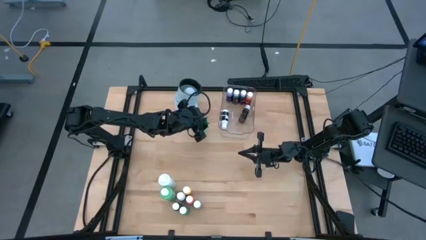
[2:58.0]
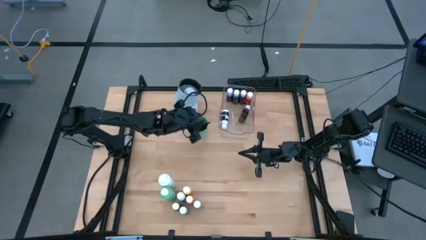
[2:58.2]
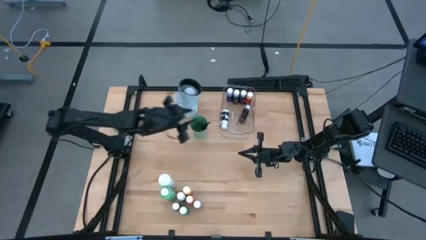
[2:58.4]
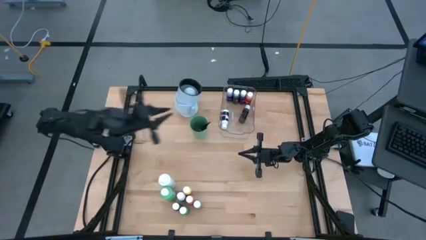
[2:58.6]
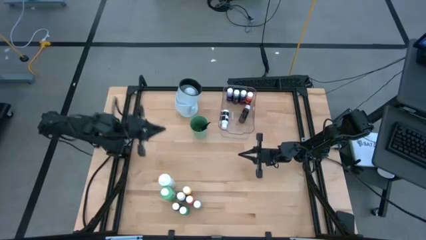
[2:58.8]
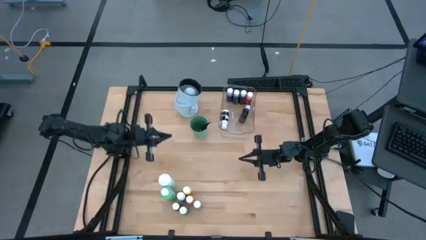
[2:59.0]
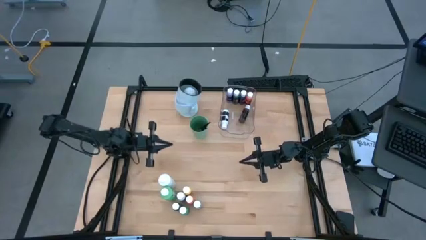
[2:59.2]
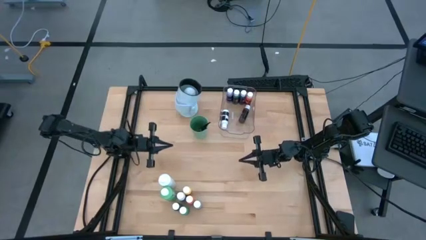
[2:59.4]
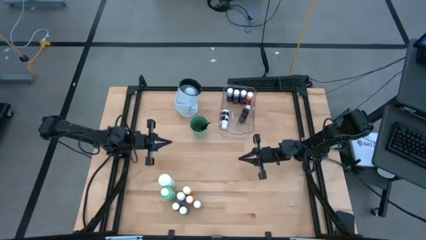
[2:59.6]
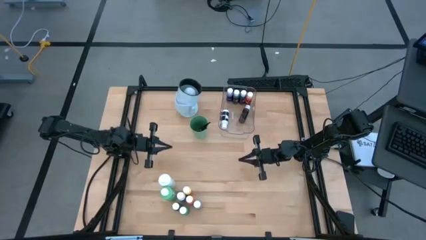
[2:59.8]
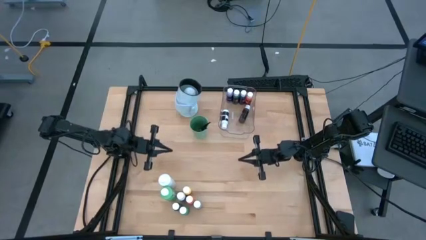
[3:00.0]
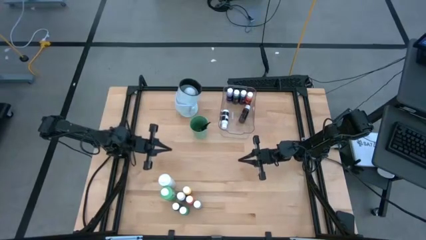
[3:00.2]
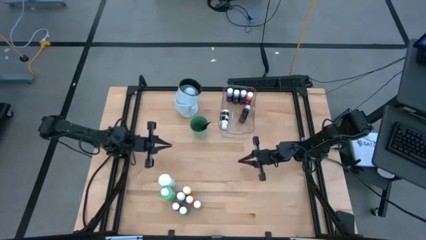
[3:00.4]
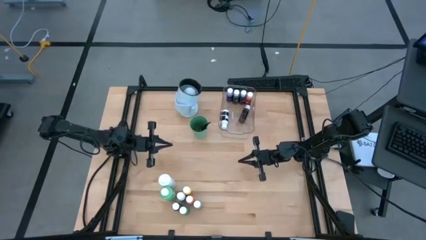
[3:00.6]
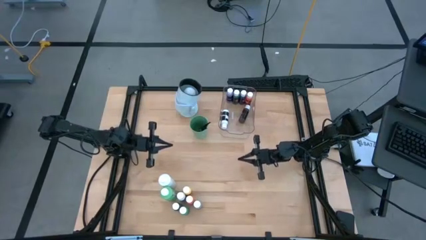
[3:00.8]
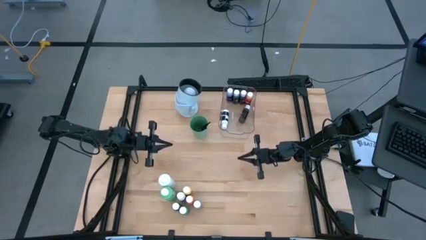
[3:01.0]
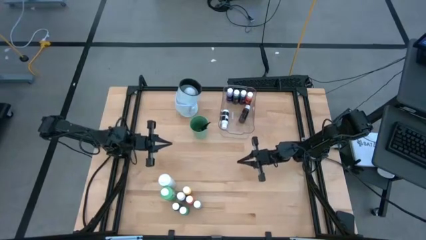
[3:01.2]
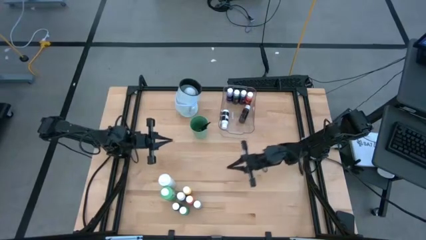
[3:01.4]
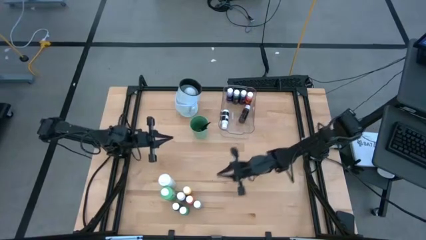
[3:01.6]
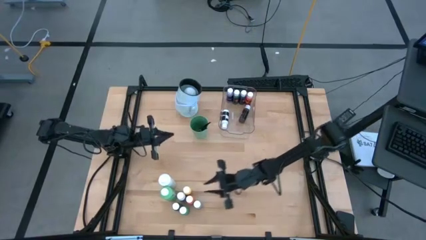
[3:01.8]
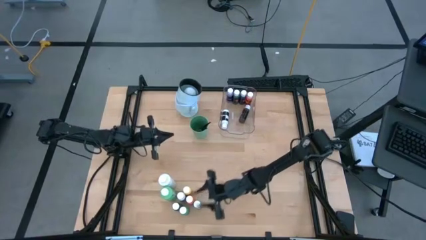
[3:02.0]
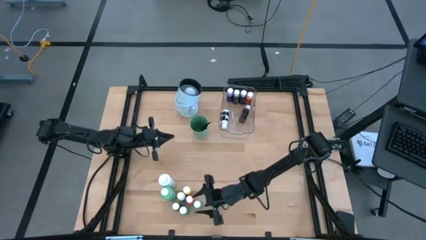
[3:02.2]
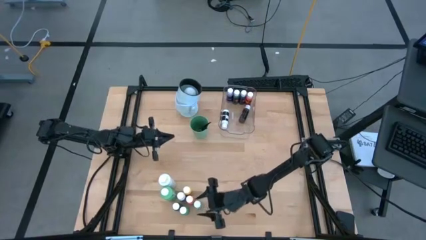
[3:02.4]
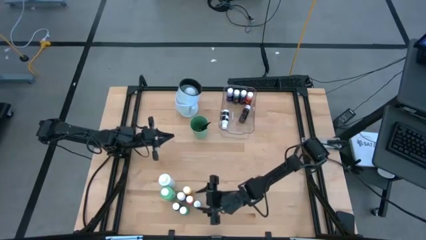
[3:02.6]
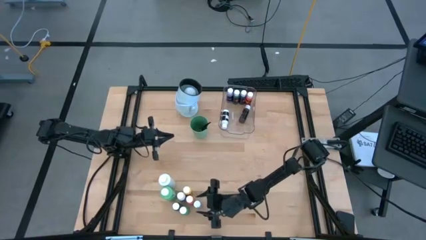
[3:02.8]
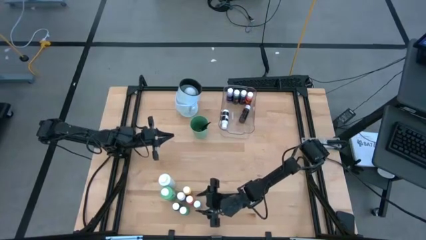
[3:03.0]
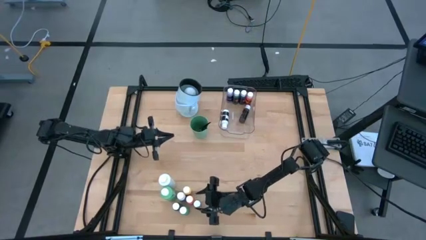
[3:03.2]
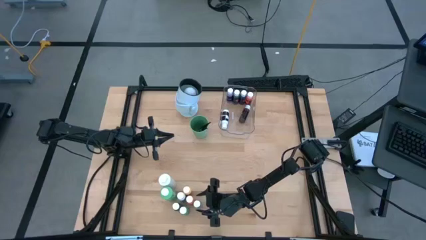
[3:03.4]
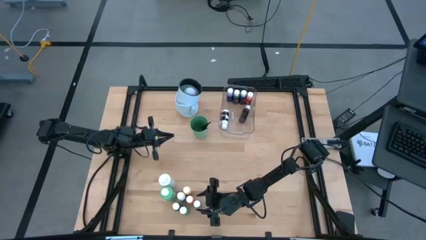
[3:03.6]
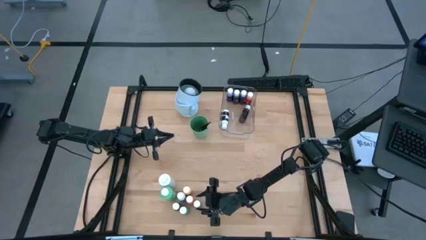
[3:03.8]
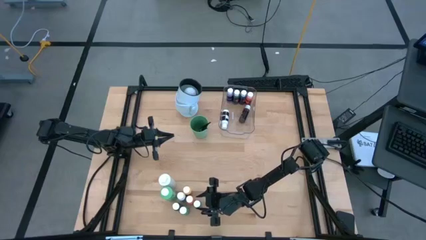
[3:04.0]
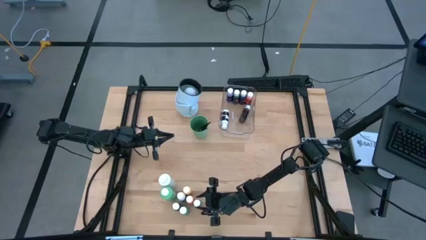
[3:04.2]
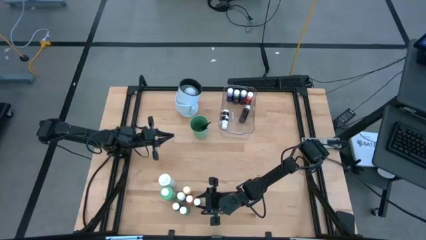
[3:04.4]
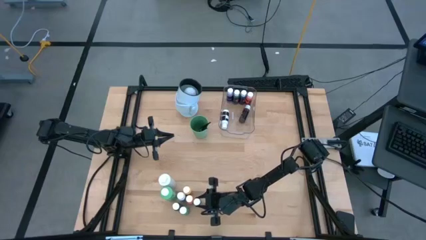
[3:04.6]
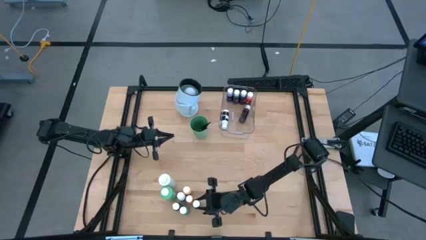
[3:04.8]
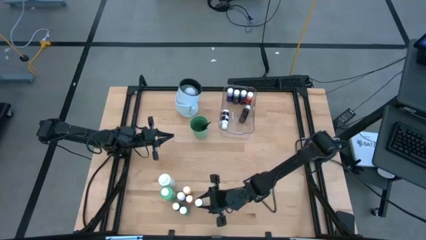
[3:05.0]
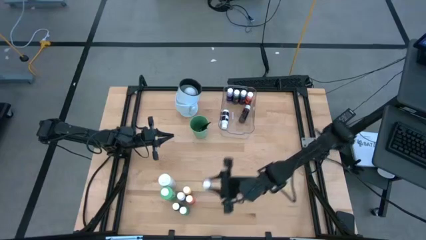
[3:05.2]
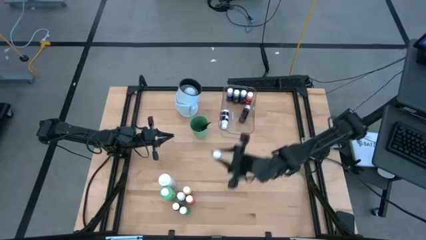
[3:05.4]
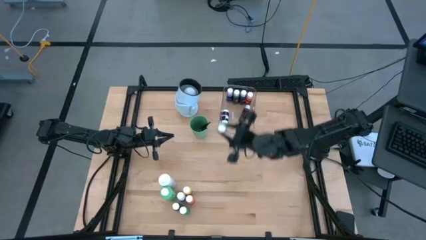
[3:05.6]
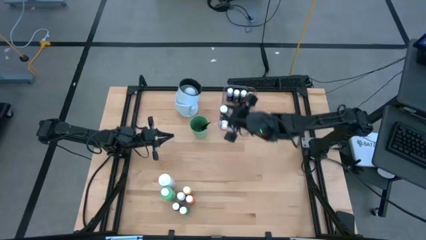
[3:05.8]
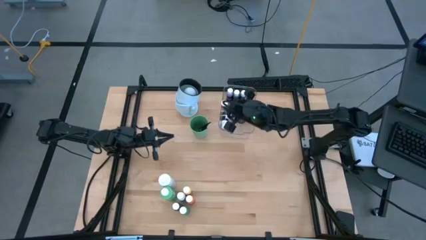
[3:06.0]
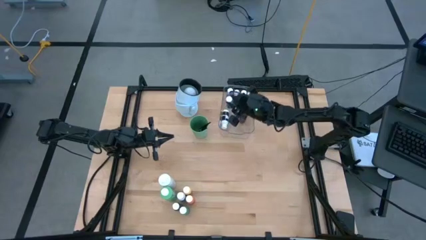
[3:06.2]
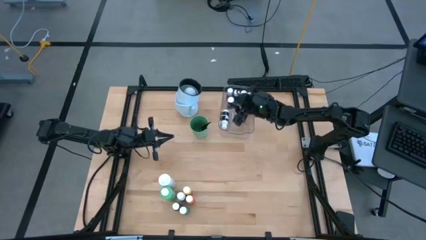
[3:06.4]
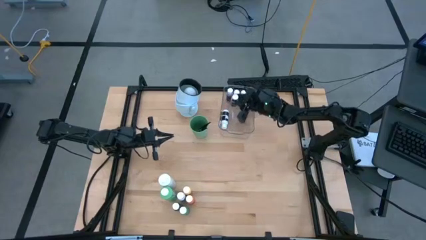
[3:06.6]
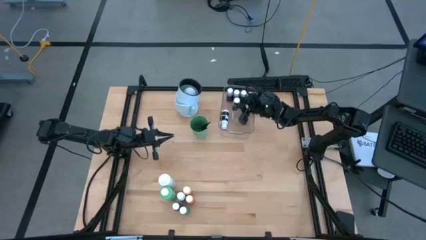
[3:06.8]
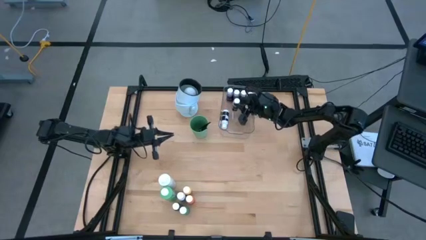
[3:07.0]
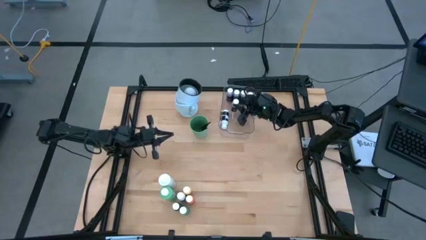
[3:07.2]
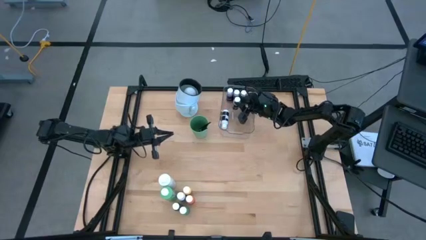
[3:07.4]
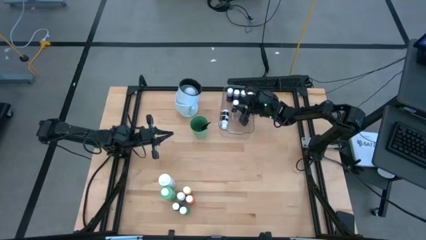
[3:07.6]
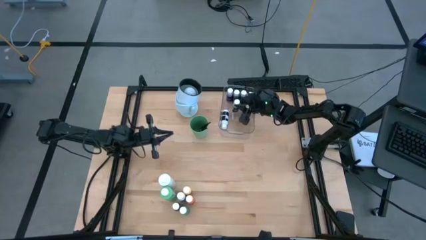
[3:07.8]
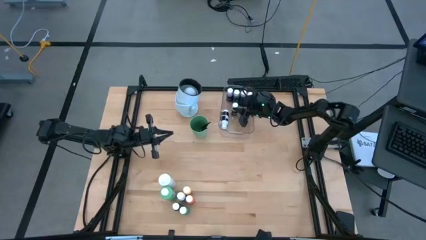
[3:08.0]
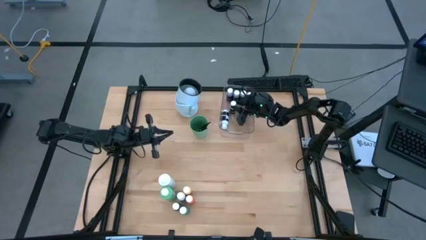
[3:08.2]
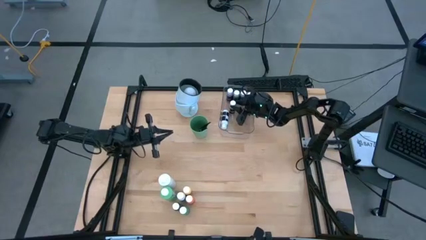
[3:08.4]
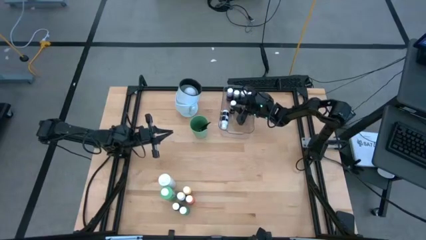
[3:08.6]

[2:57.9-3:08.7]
Task: Pick & Place Paint Supplies
Put the gray paint bottle into the transparent bin
